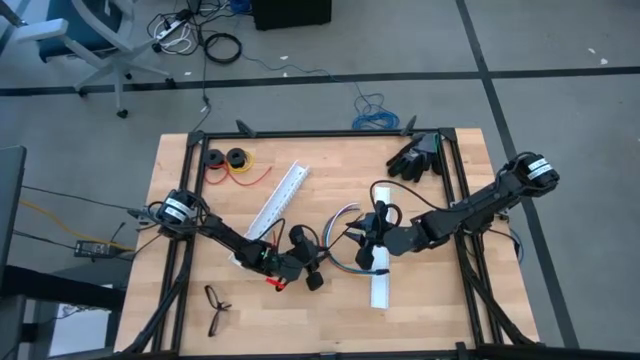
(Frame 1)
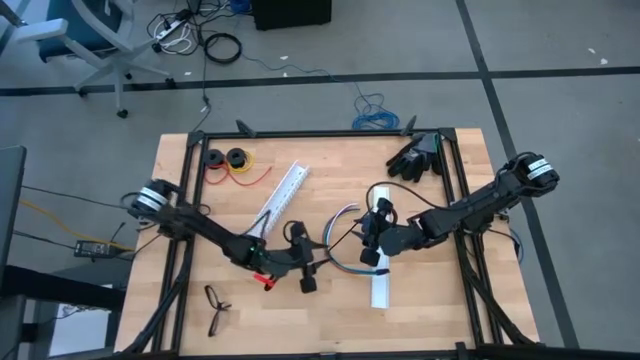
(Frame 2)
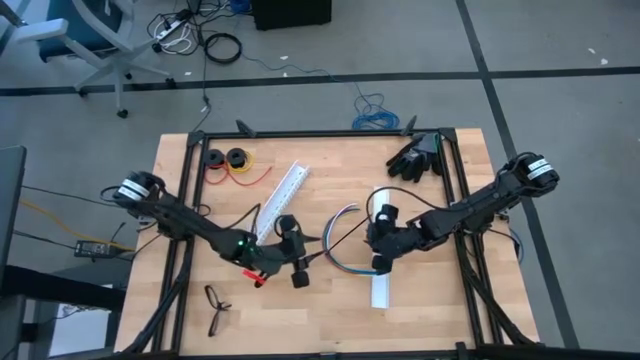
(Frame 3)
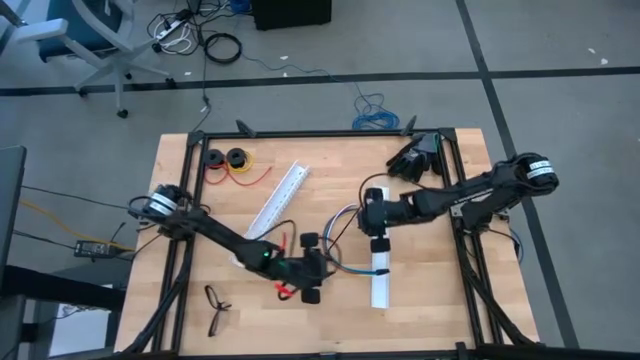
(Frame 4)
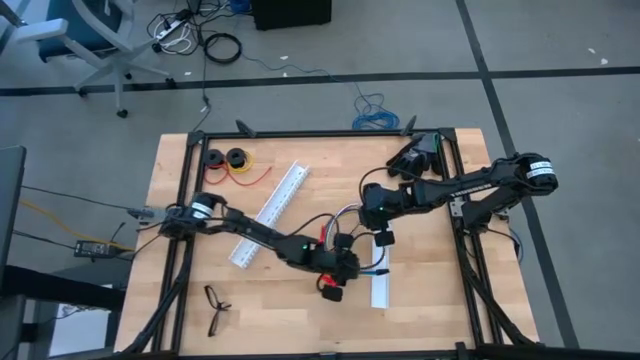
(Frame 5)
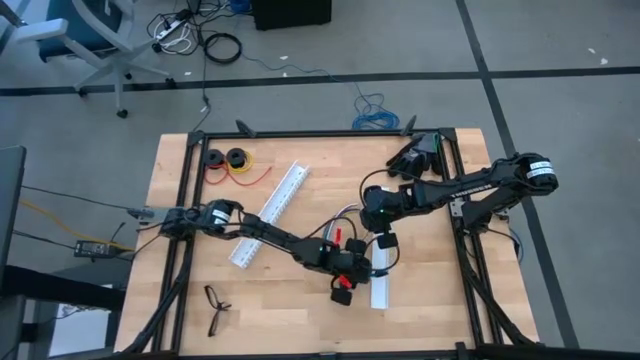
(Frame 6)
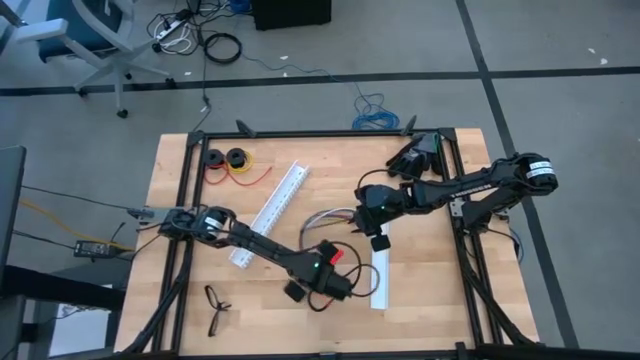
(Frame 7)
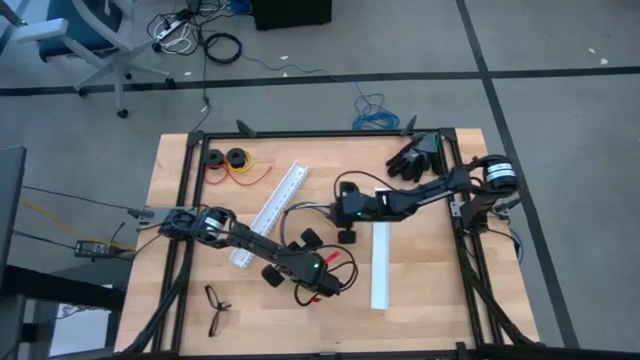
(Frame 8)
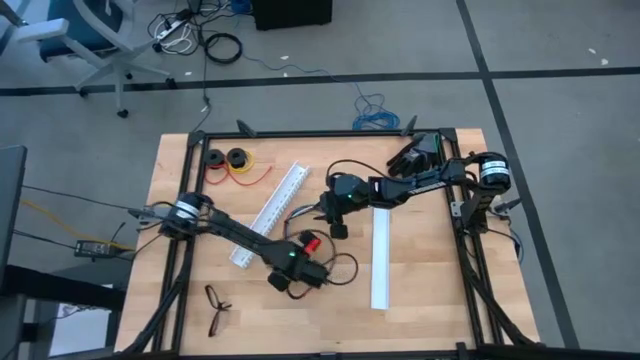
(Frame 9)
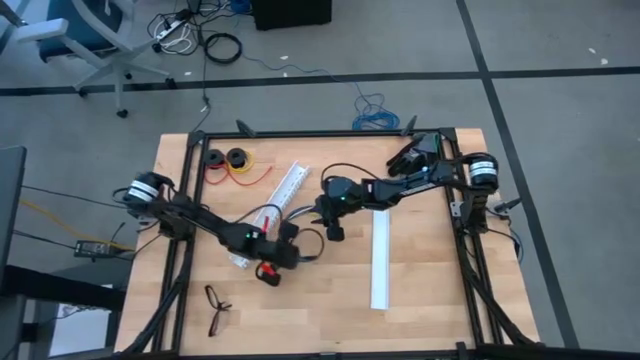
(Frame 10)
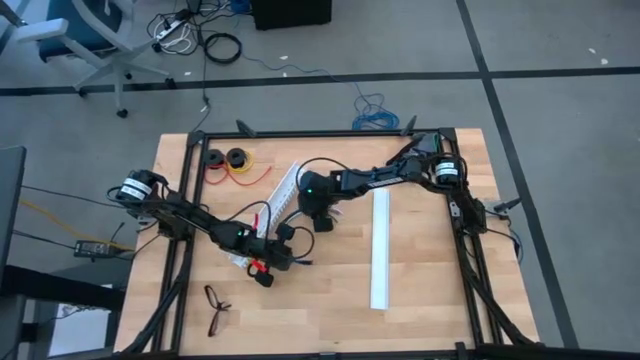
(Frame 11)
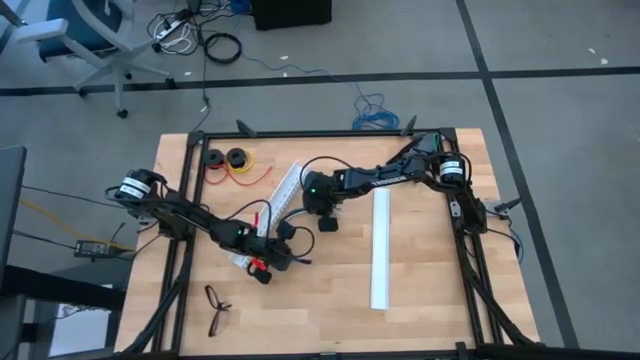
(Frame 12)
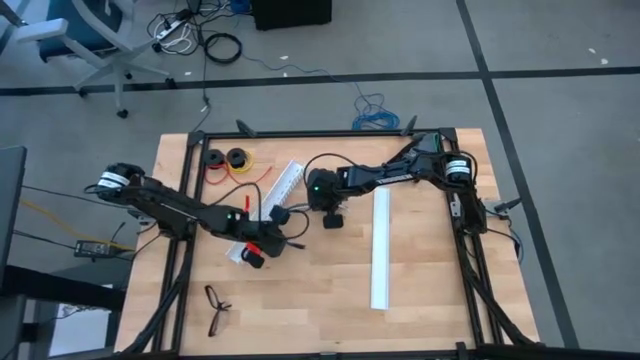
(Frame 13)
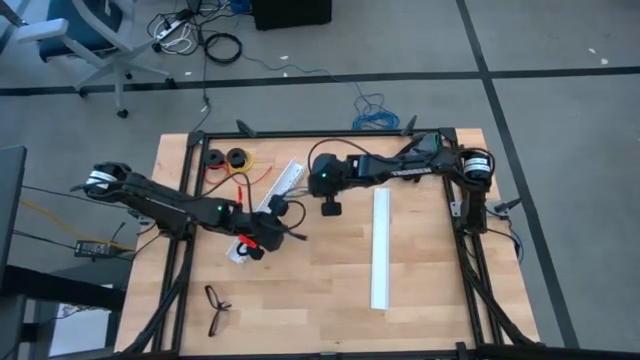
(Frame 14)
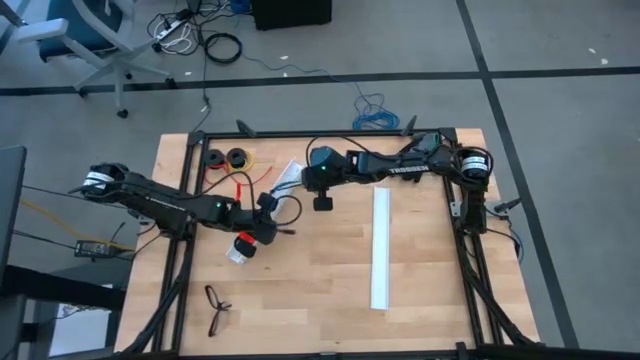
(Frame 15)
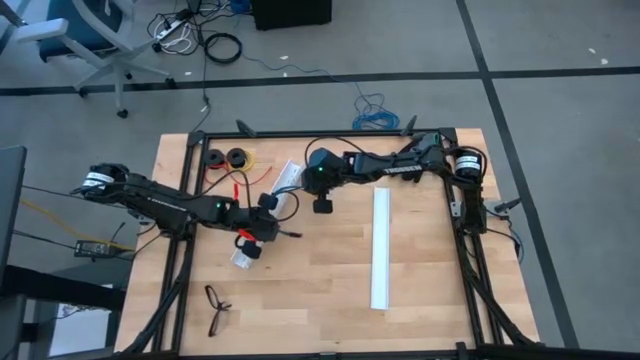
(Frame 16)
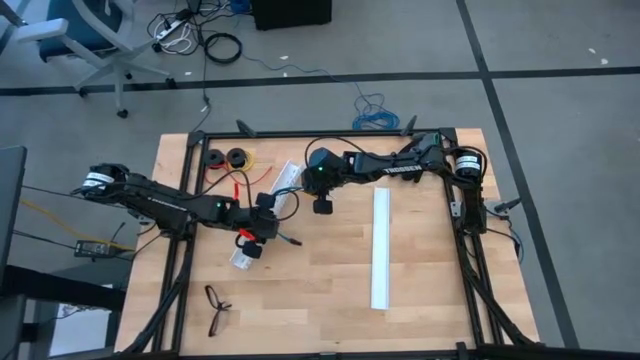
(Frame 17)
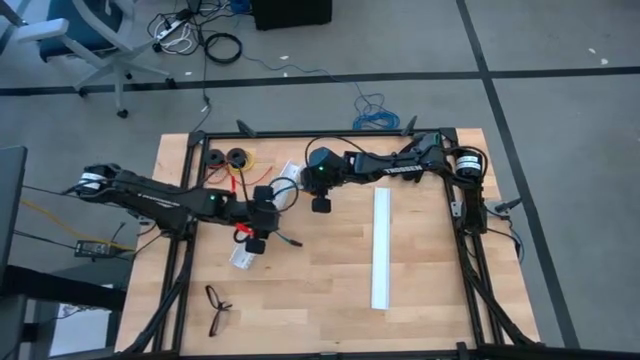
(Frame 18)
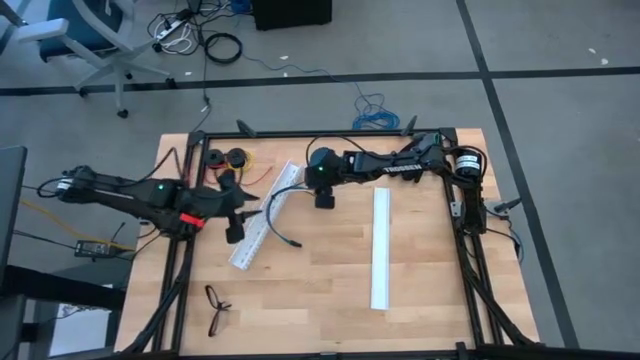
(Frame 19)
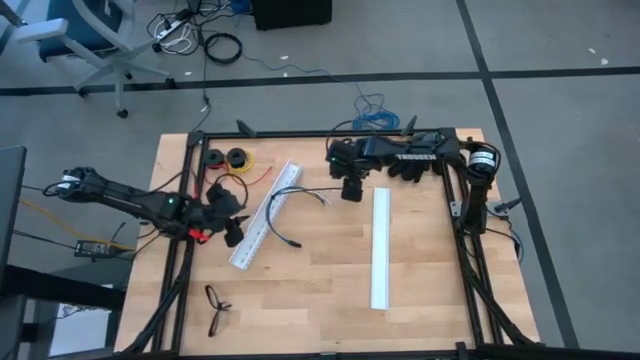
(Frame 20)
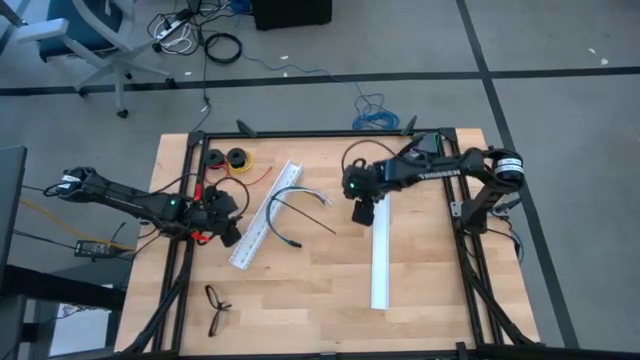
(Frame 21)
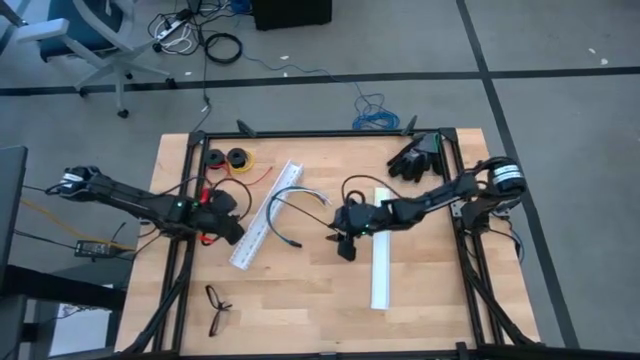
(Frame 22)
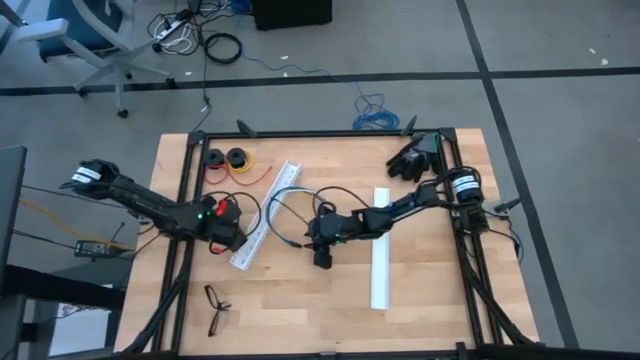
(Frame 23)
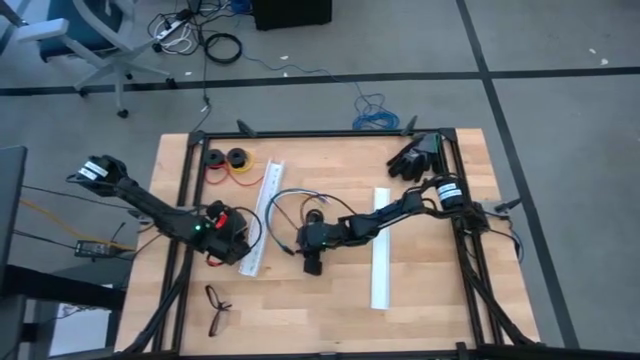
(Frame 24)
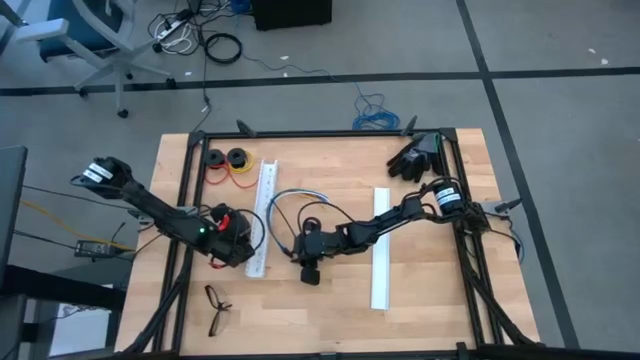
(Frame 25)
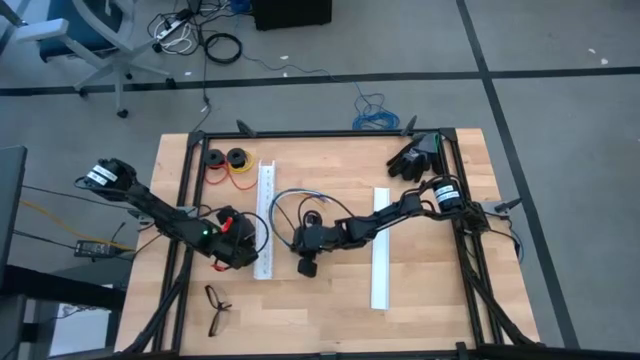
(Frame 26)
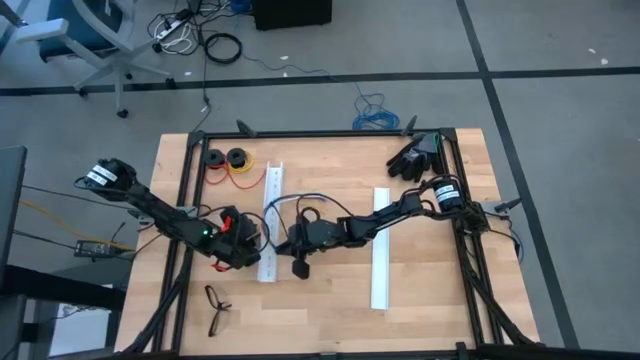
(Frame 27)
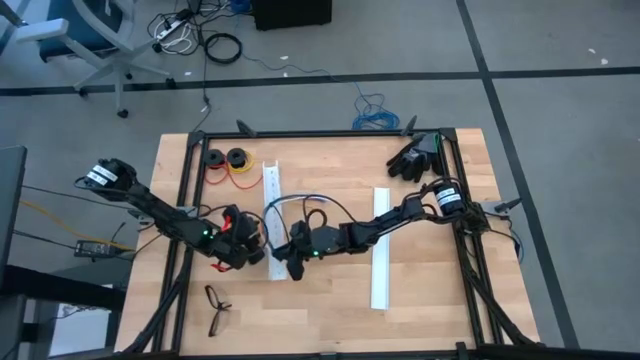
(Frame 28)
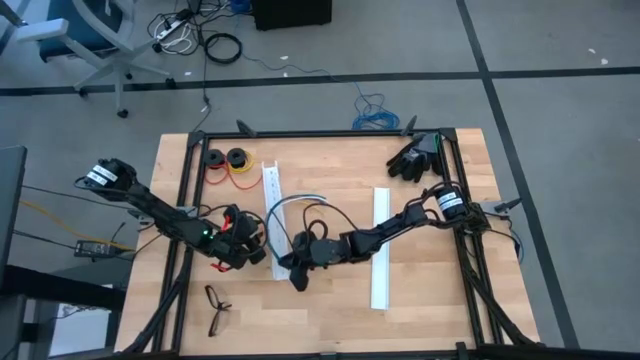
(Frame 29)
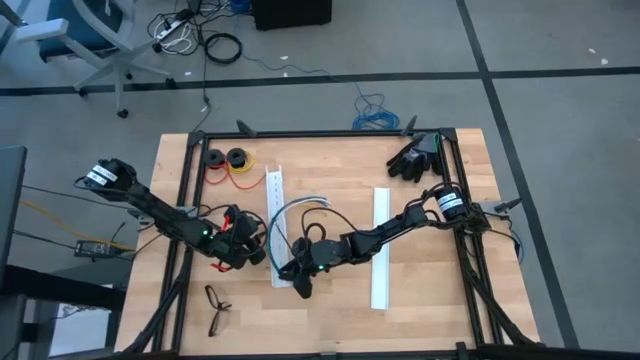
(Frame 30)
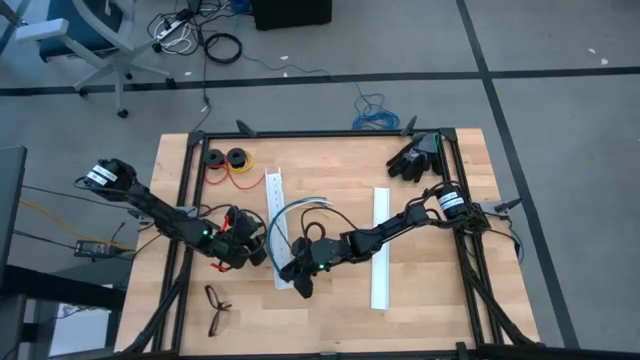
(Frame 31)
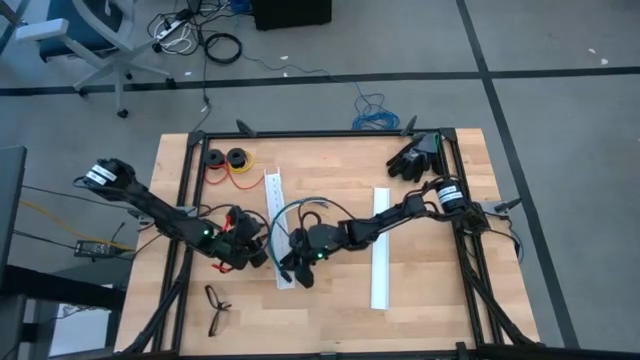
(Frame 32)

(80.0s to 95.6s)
Task: Ziptie cables
Put the zip-tied cables into the white cable duct

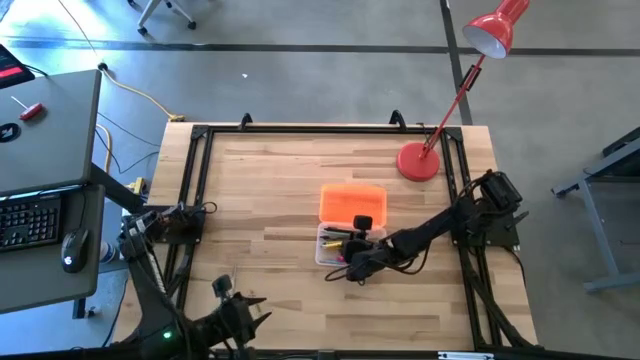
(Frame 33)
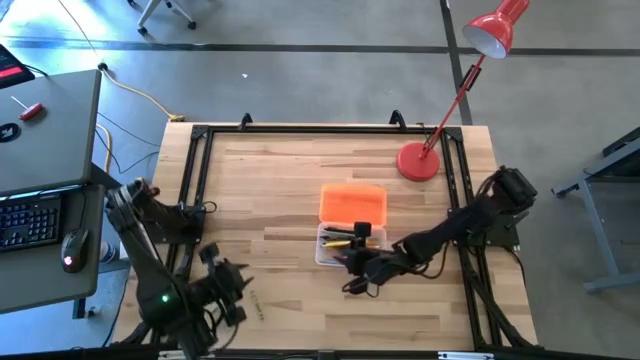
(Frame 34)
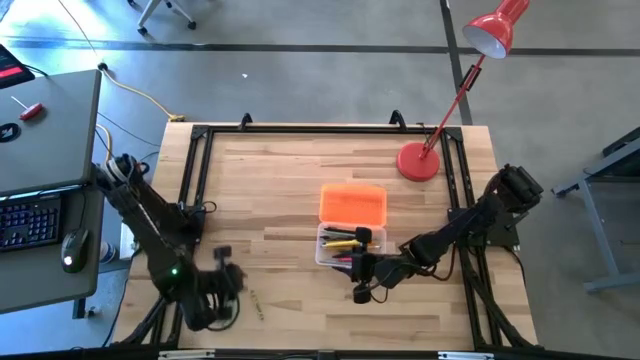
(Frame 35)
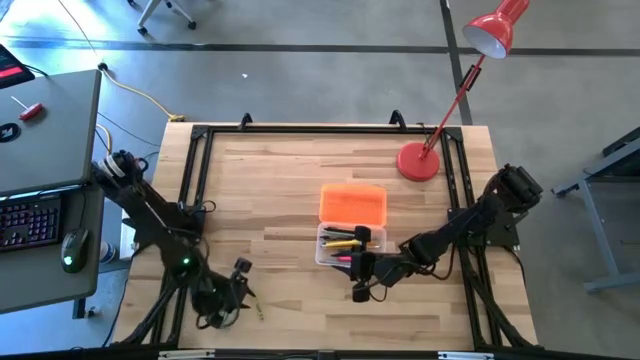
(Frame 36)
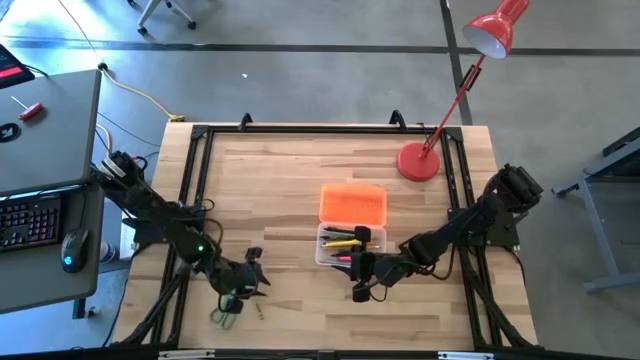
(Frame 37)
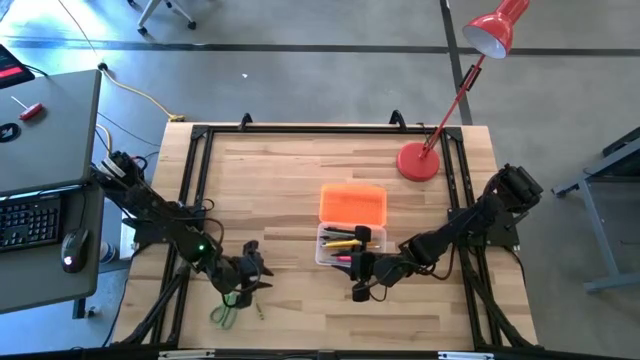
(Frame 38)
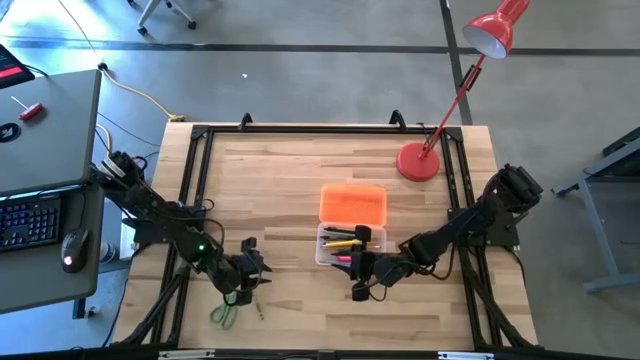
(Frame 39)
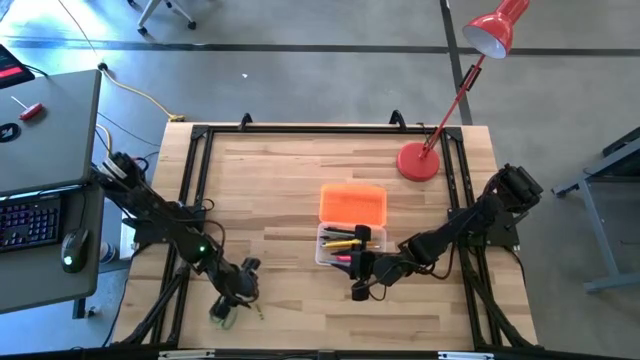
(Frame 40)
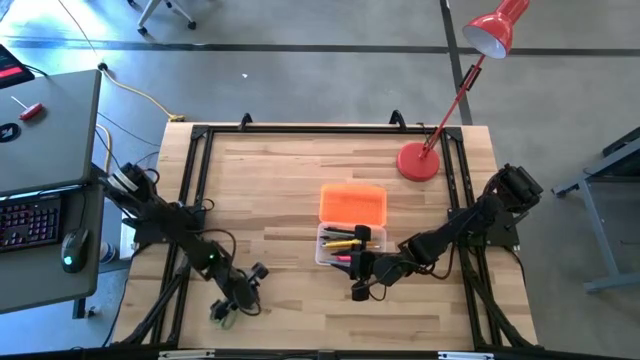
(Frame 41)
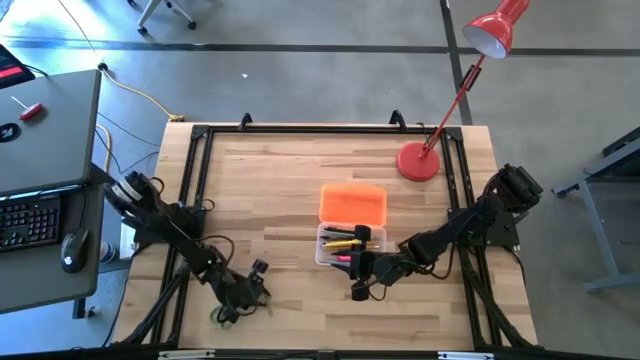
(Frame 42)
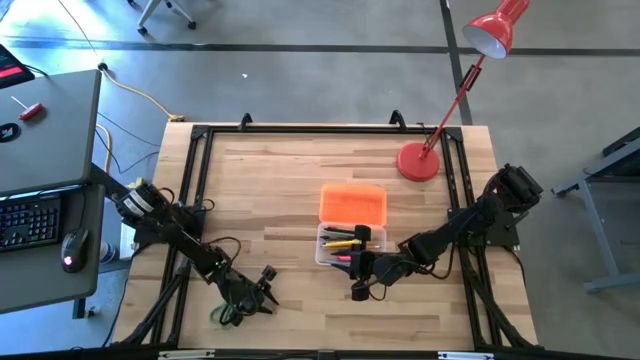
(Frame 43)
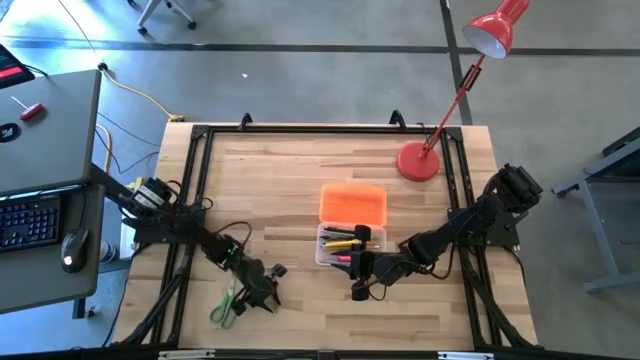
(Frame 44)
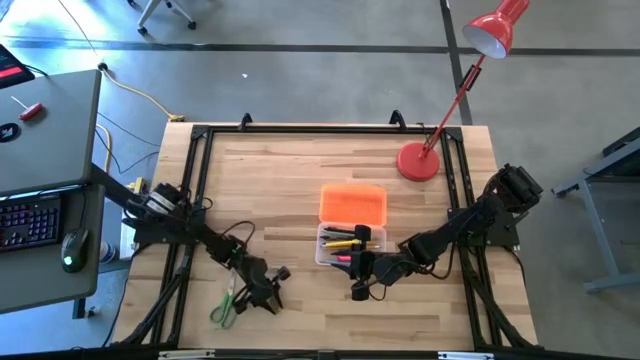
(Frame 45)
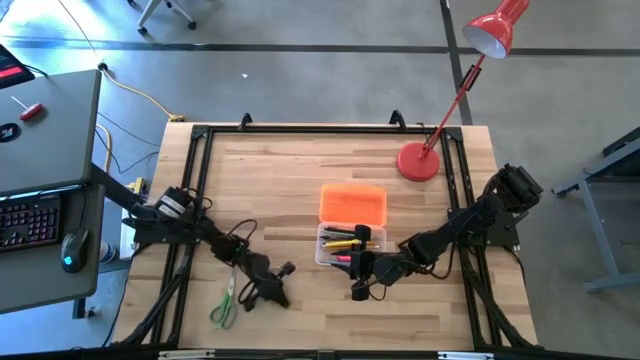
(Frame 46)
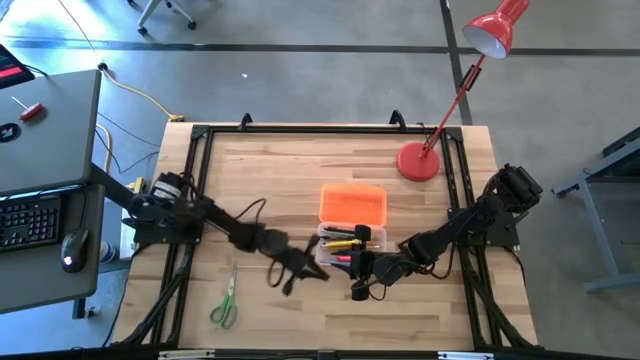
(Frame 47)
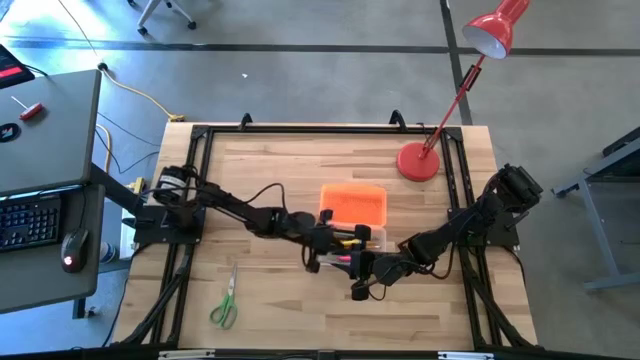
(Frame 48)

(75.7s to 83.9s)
Task: Pick & place school supplies into a supply box
Put the green crayon into the supply box
